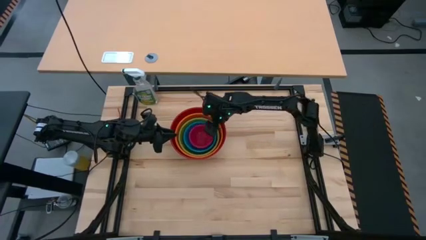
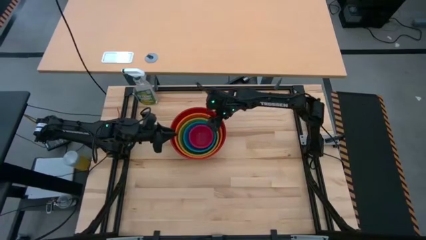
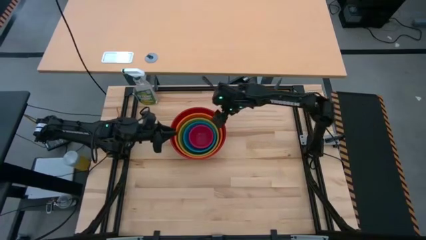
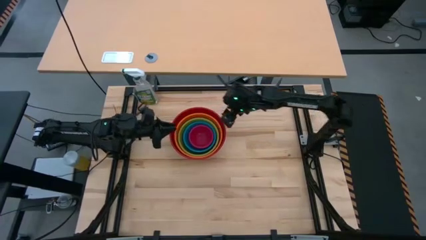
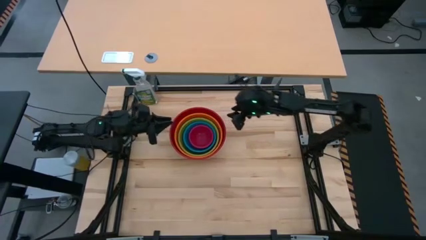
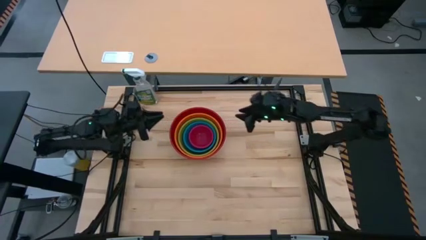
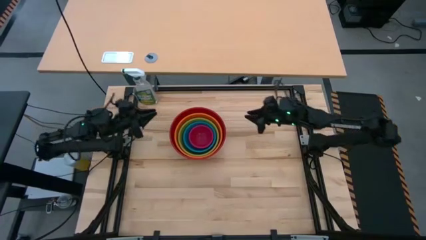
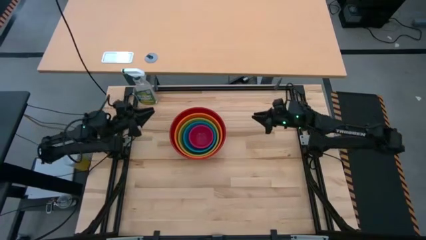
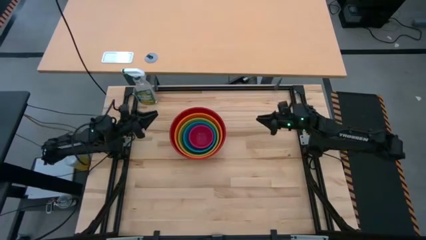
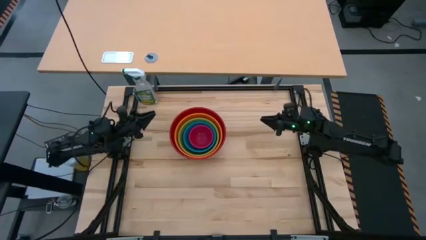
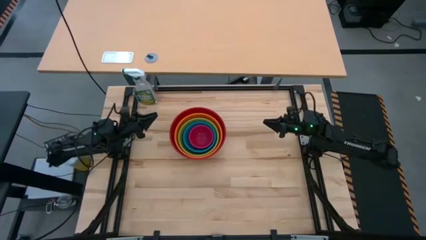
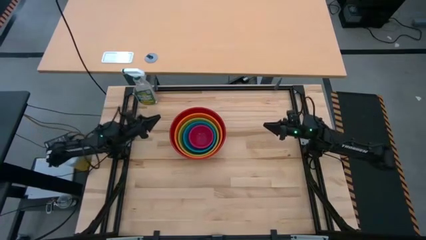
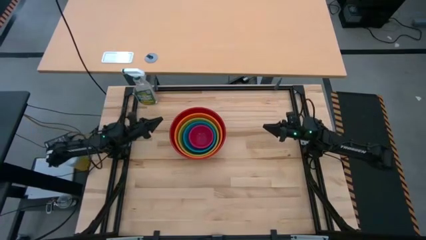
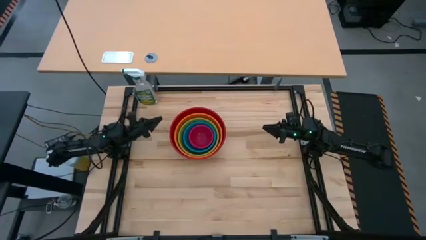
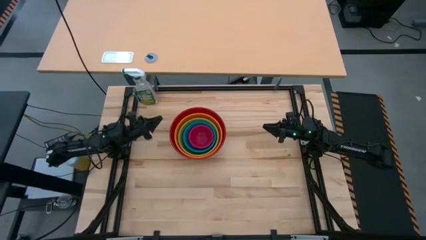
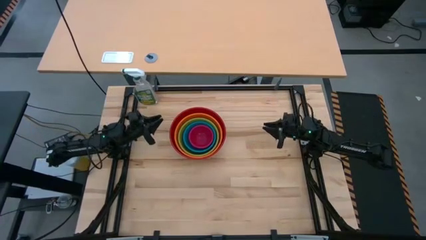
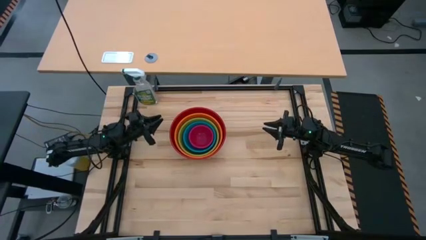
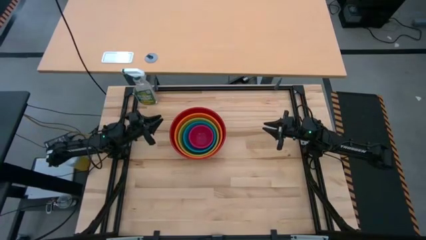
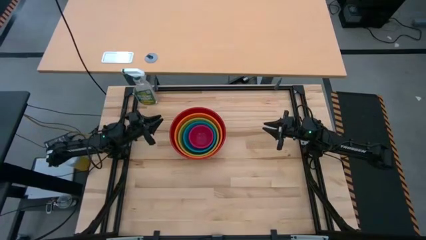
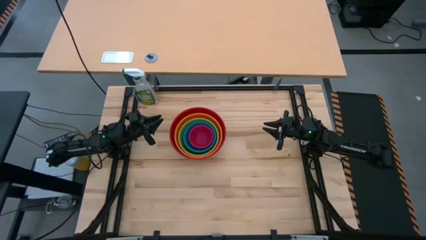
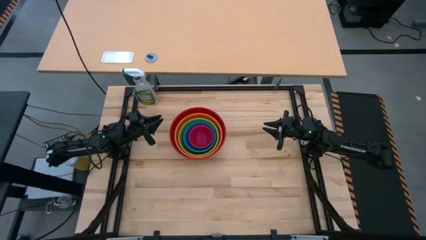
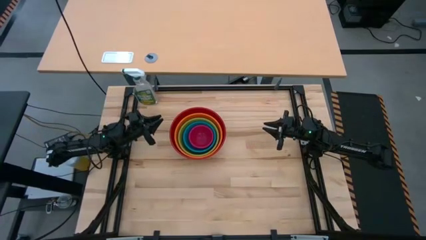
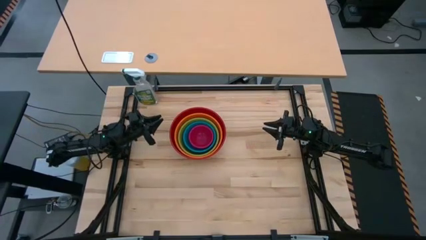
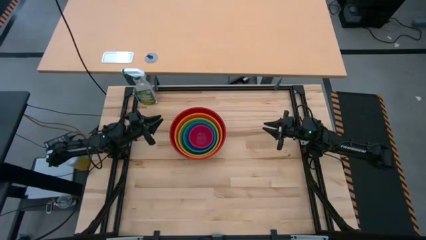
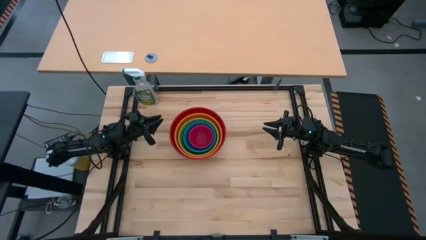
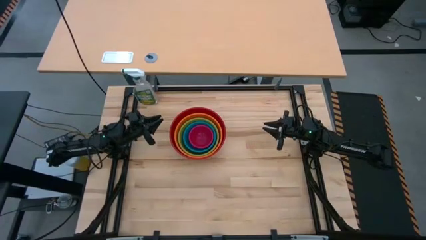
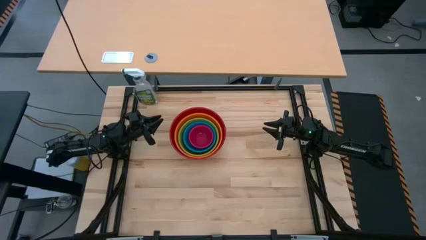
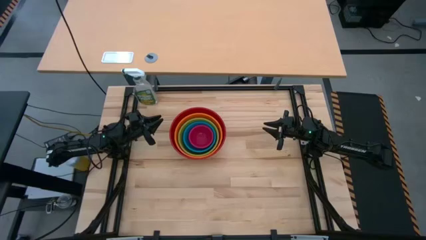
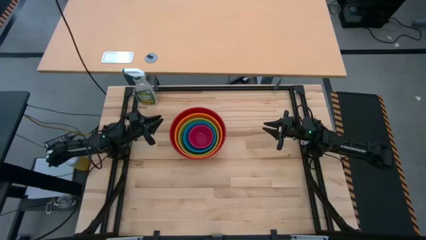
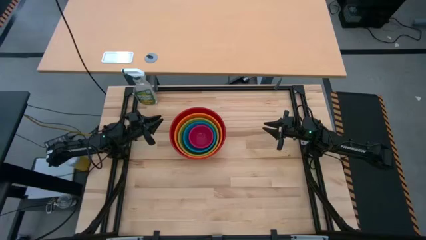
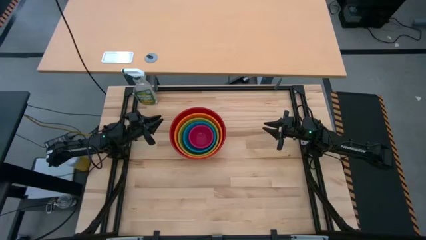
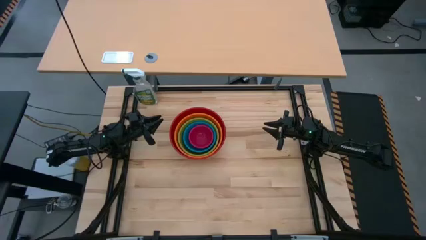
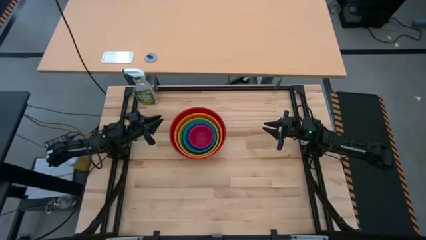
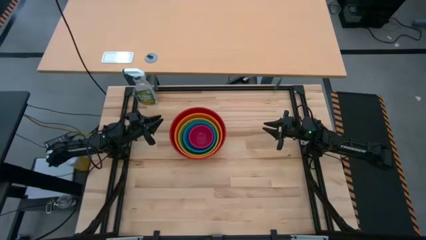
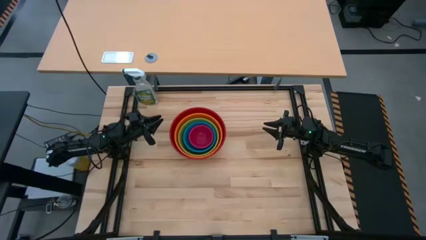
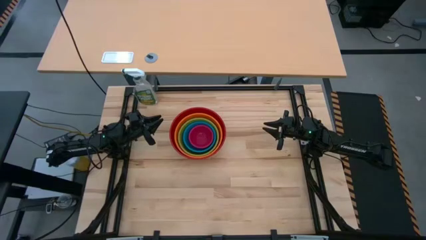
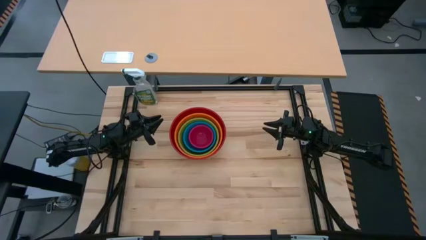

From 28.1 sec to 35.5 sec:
Return to Home Position
